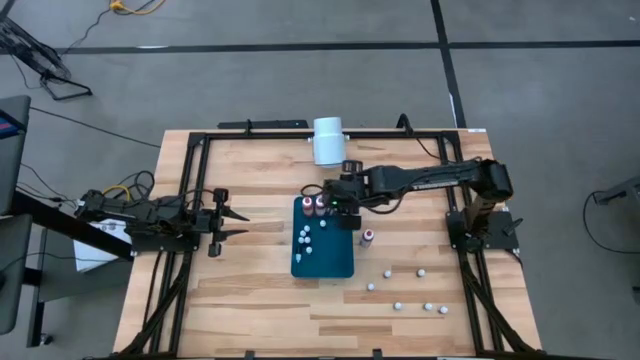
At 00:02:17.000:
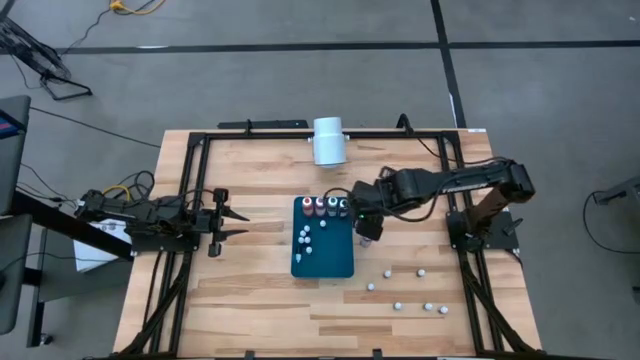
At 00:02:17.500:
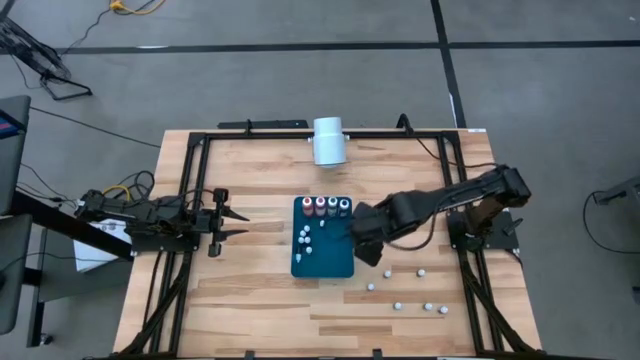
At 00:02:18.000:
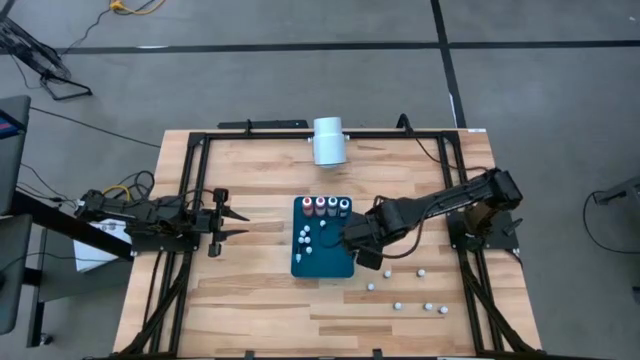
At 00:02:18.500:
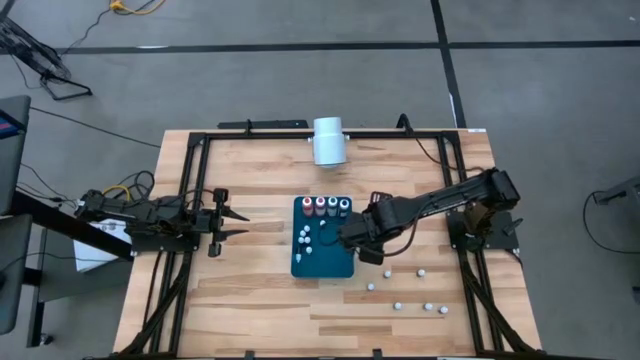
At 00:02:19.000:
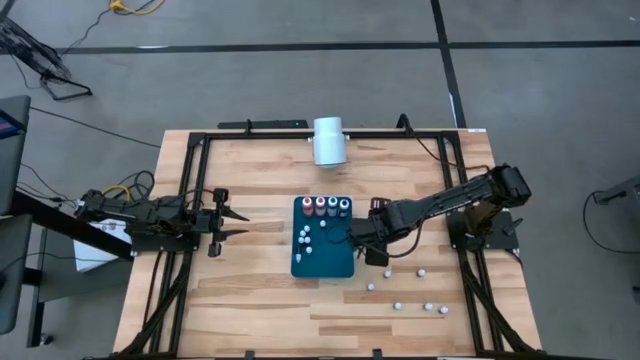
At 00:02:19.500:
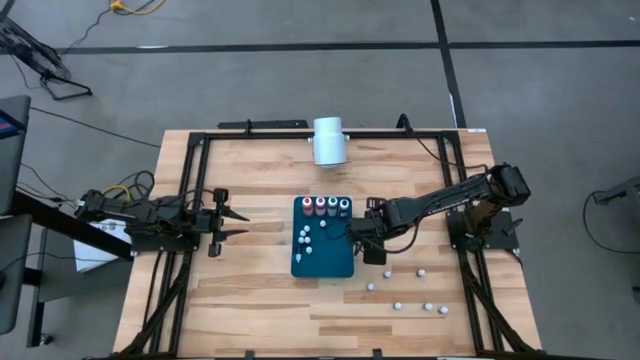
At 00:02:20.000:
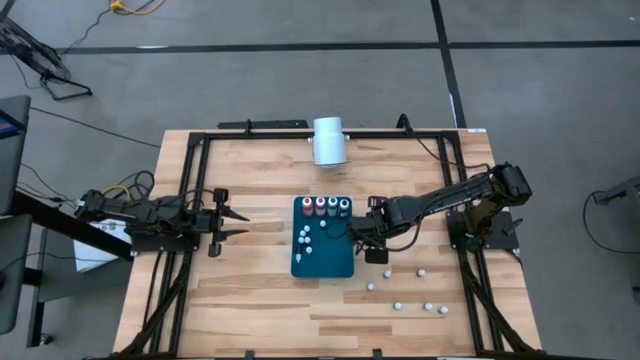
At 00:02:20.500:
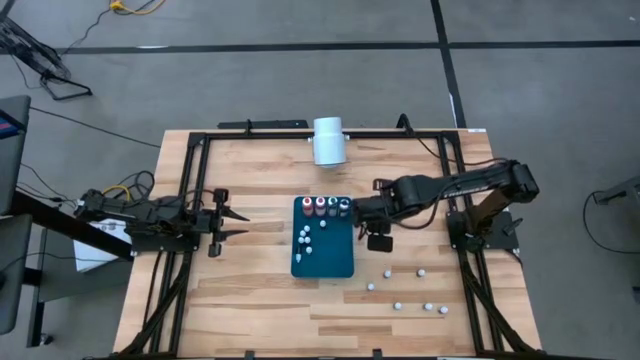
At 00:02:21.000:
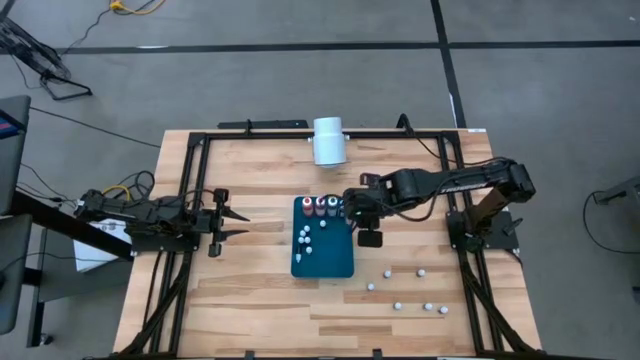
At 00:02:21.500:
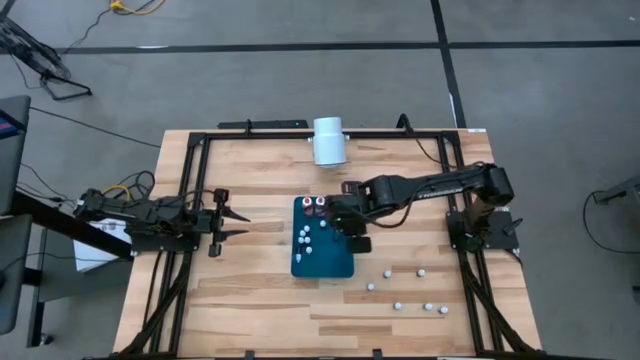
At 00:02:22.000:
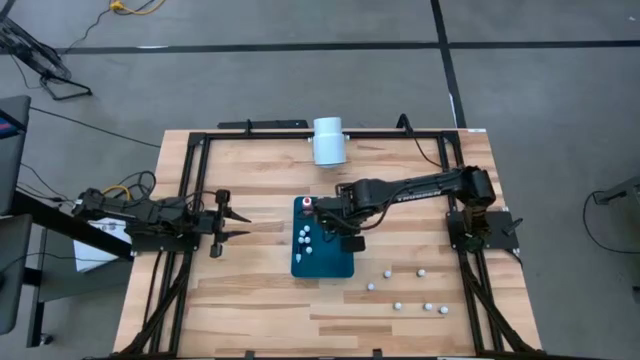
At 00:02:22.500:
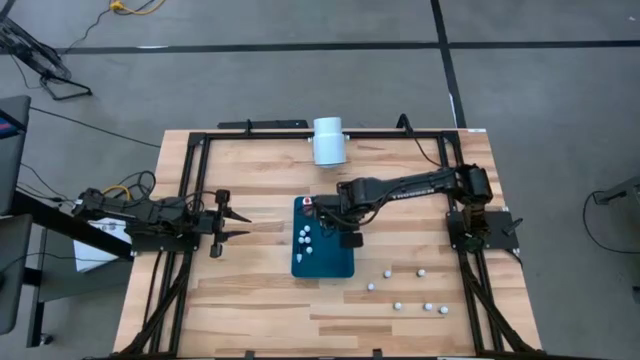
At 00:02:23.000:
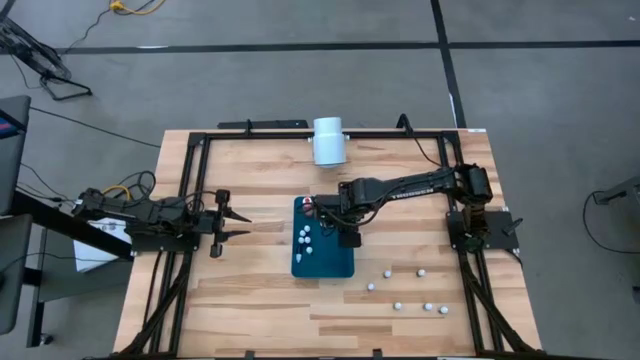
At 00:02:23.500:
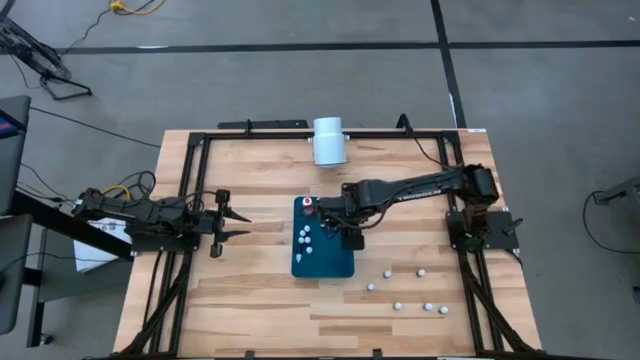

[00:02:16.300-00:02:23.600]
Task: Pick & Place food coloring
Put the large red bottle into the blue bin

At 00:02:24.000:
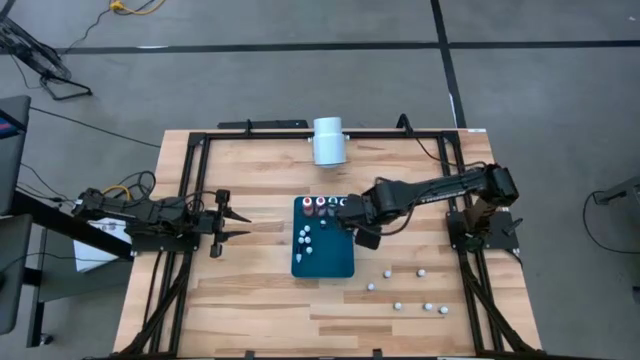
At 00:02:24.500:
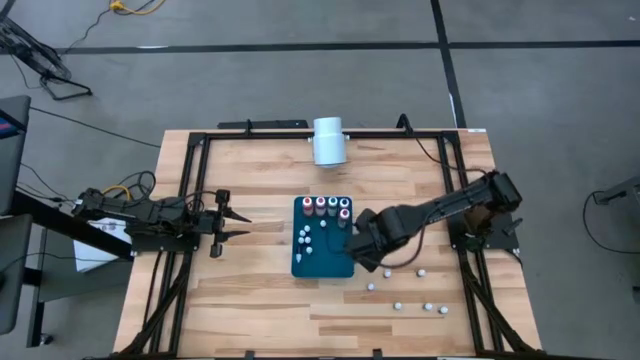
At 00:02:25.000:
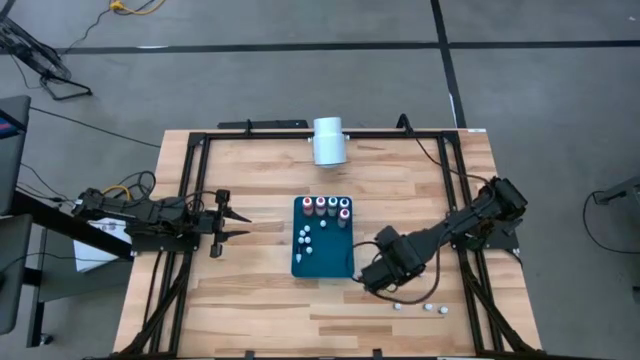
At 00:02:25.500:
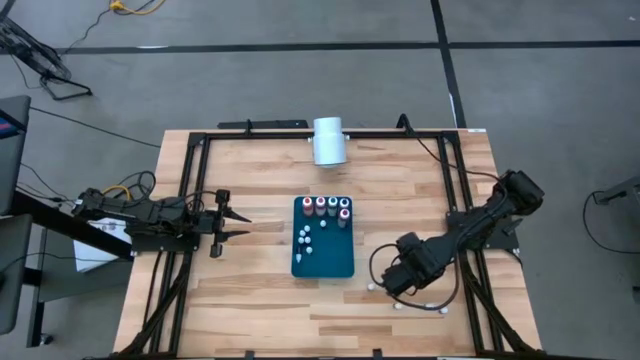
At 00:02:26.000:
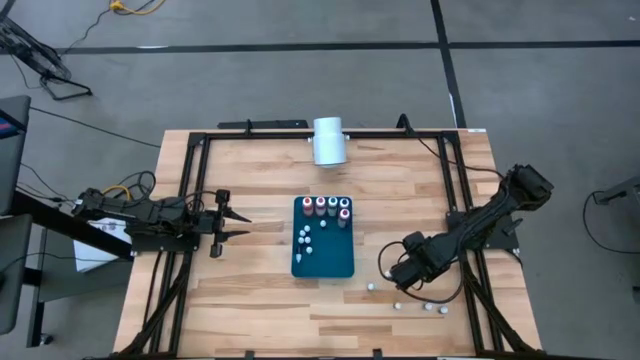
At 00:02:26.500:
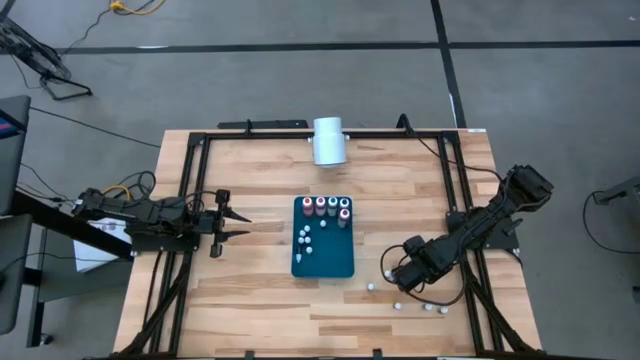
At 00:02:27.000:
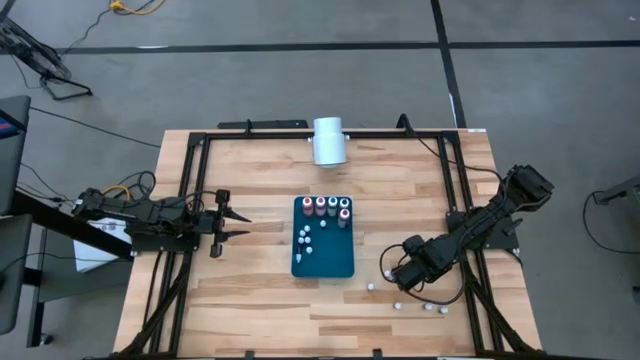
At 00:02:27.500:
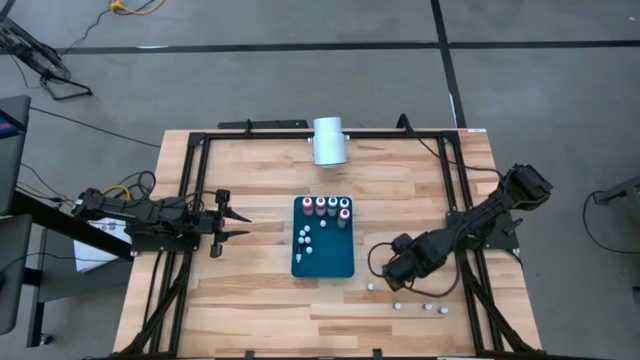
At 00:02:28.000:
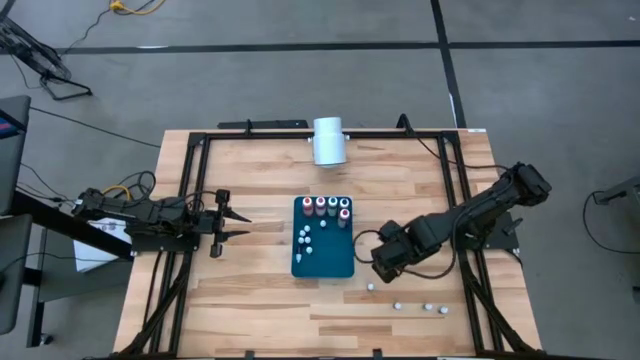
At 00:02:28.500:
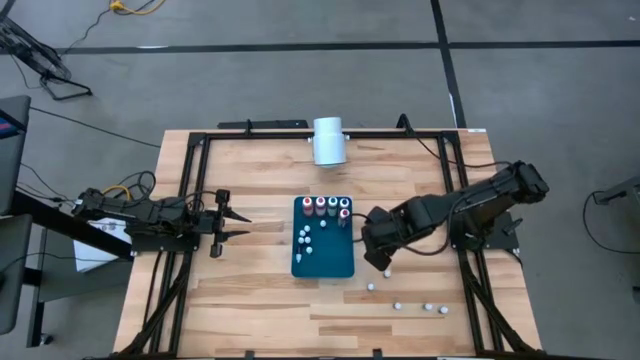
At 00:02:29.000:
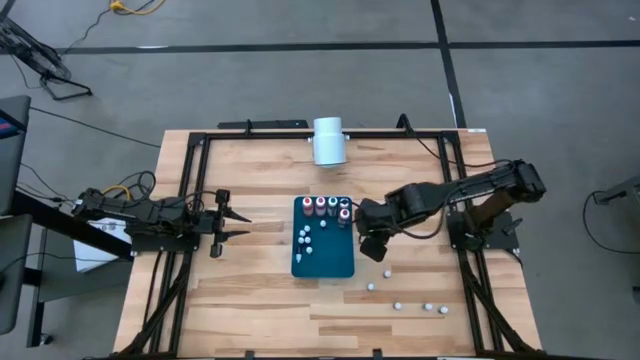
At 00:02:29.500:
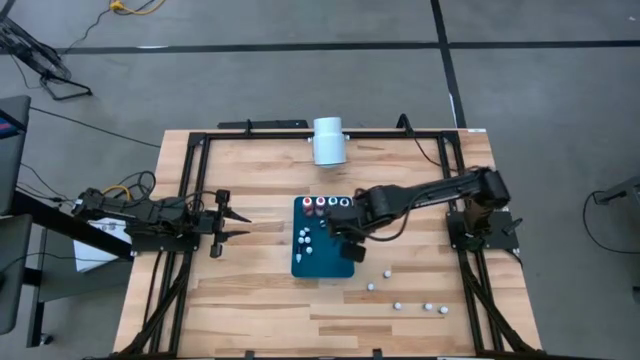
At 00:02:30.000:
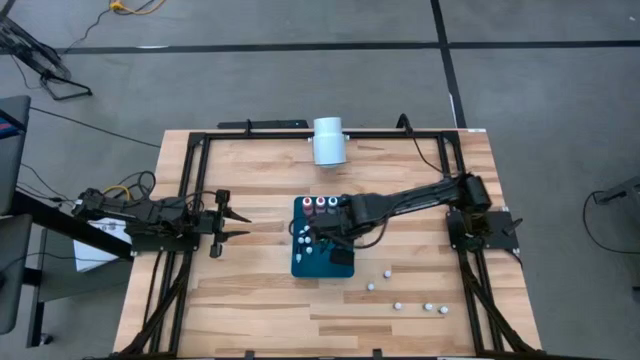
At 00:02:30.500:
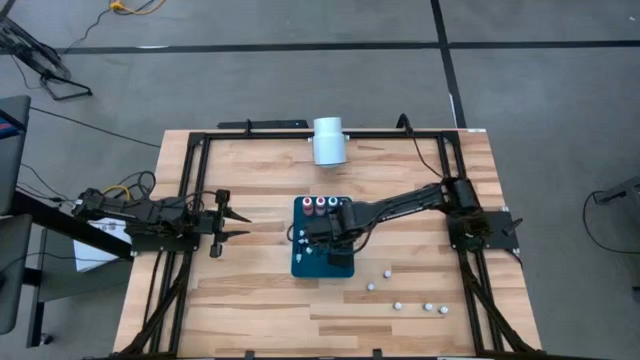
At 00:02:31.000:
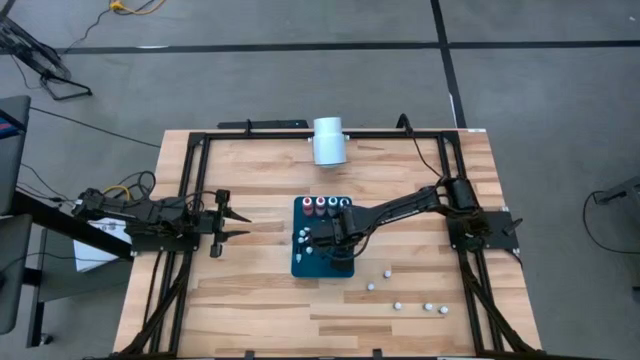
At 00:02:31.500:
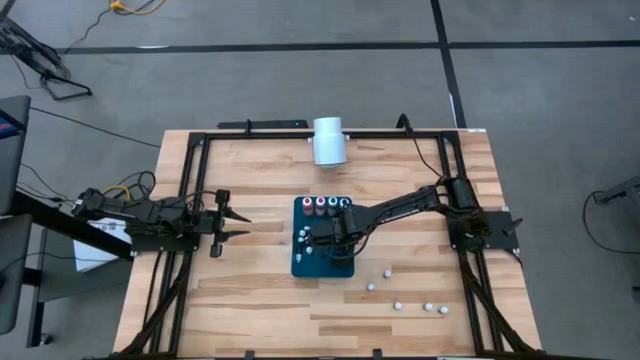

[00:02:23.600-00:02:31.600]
Put the small black food coloring bottle into the blue bin

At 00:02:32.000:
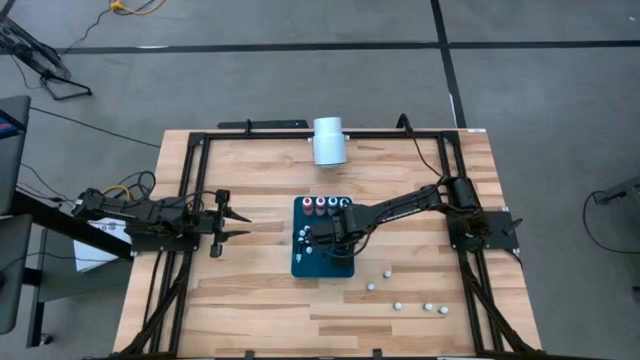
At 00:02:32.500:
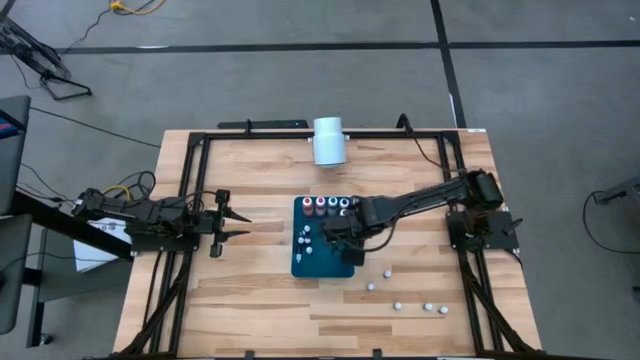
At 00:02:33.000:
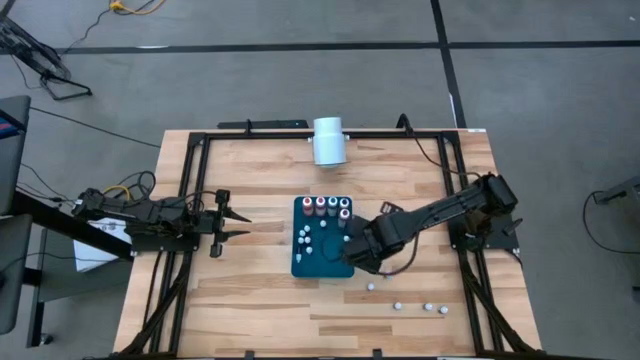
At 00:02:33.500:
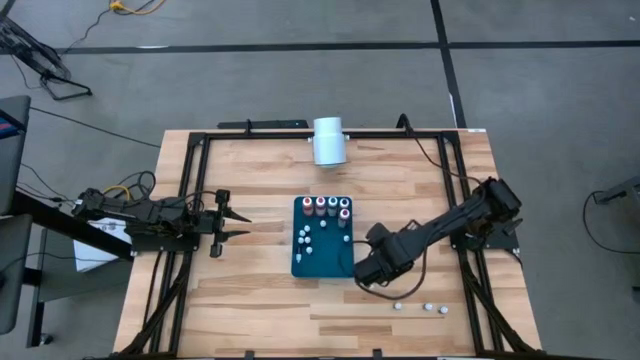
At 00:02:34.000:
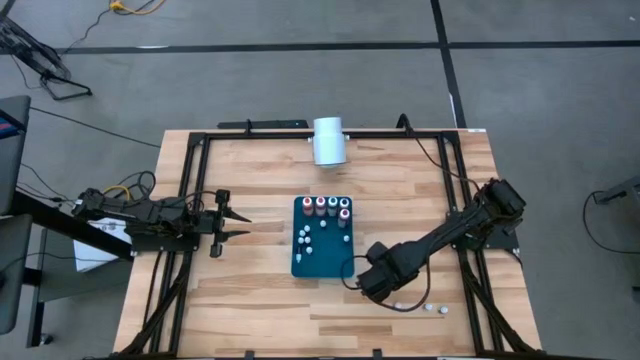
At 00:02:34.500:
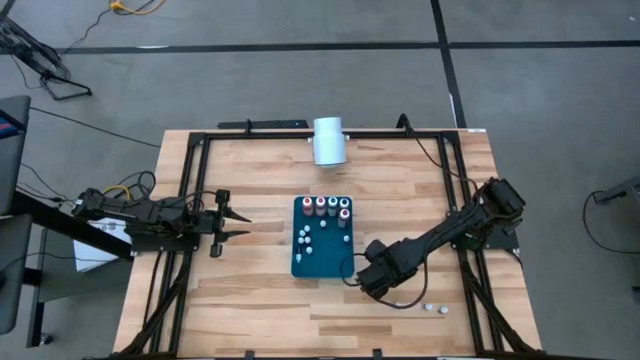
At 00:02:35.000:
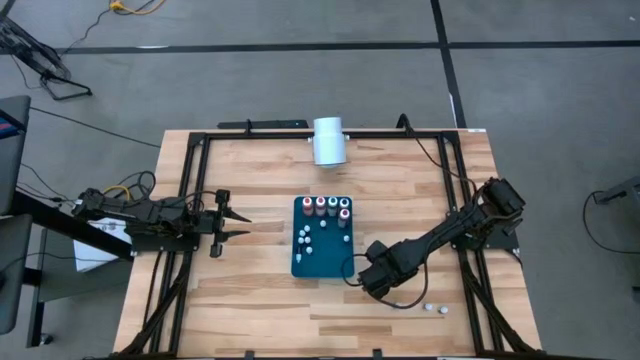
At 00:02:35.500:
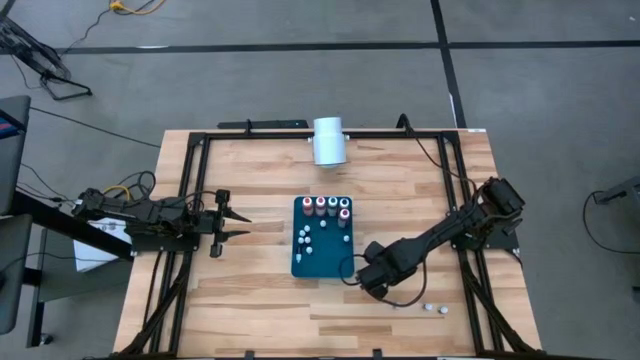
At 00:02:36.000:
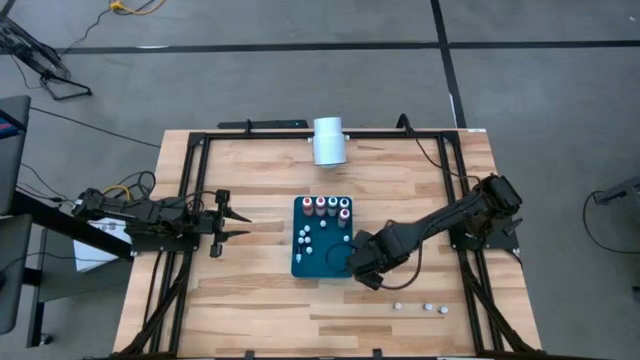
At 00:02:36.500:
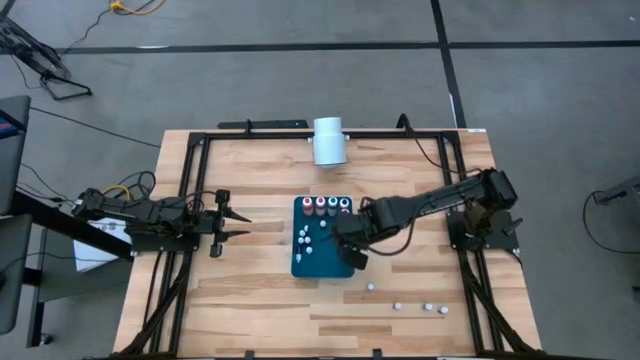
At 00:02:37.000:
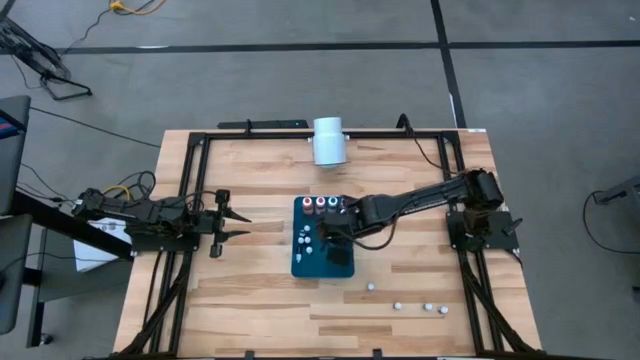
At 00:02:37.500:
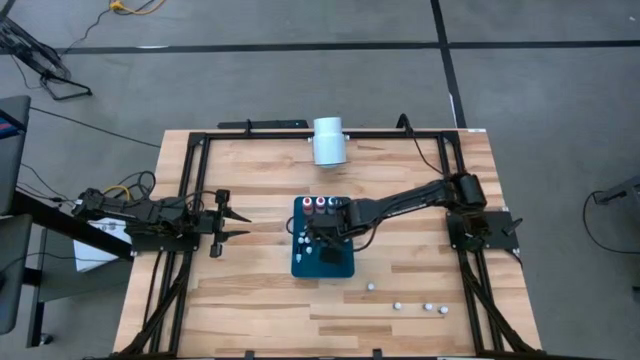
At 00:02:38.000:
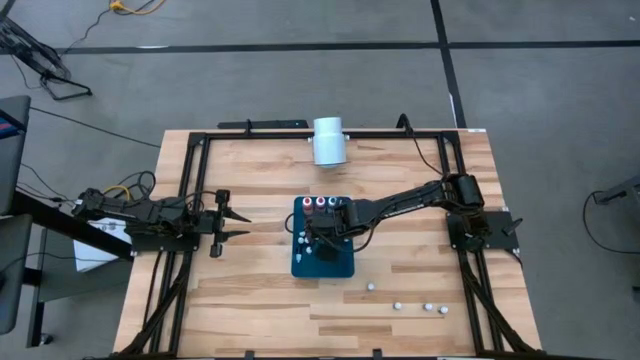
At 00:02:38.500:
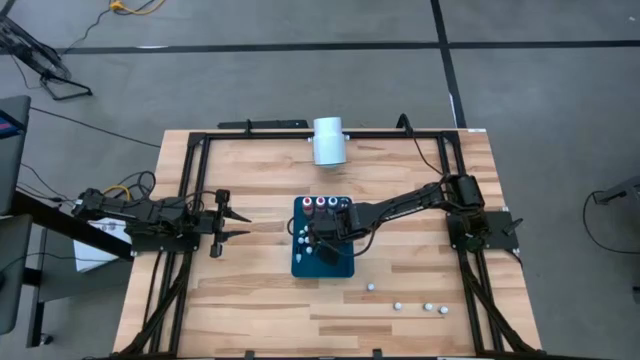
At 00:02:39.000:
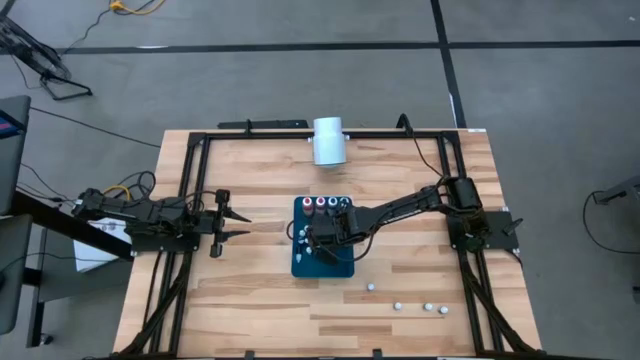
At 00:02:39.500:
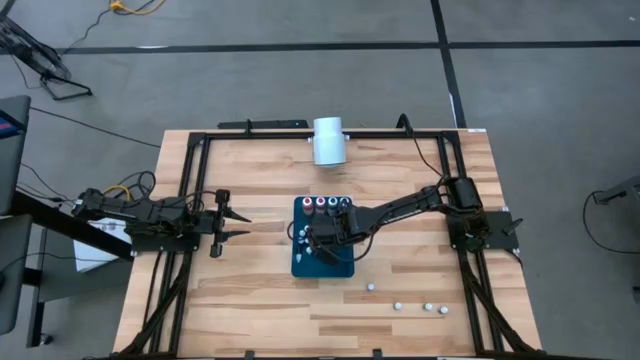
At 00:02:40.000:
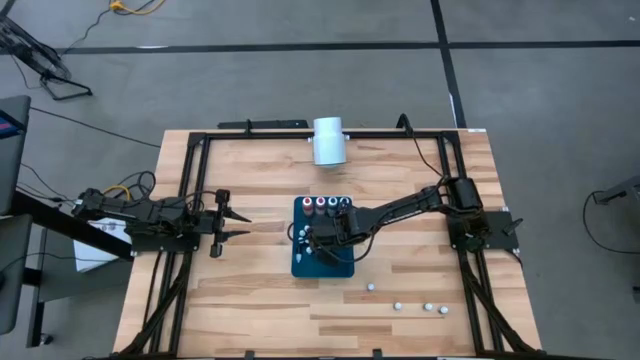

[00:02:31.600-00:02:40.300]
Put the small black food coloring bottle into the blue bin
